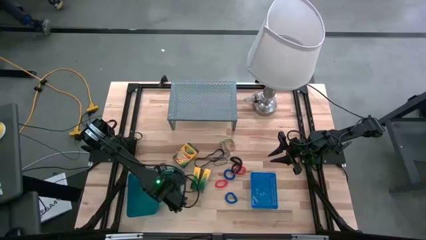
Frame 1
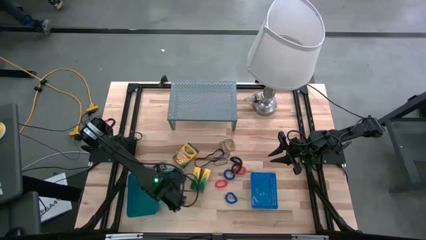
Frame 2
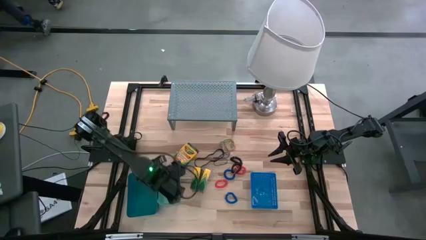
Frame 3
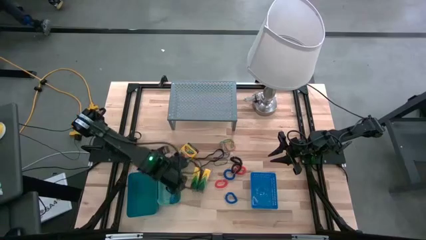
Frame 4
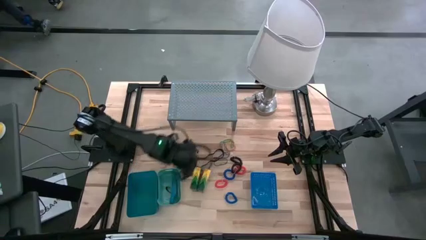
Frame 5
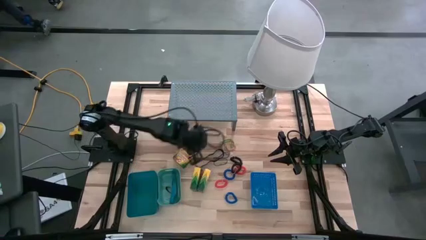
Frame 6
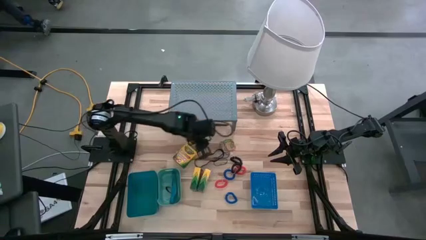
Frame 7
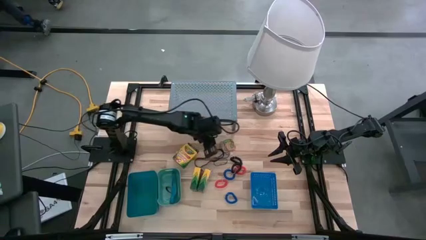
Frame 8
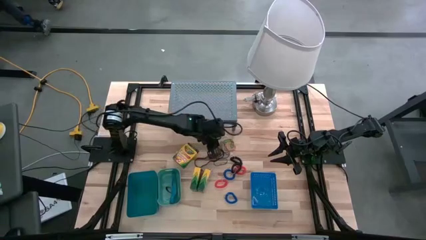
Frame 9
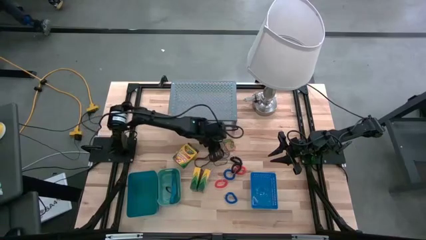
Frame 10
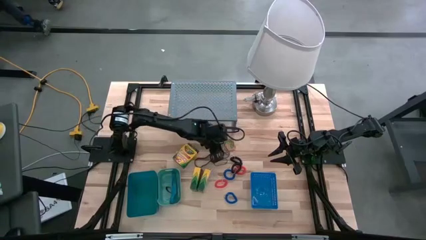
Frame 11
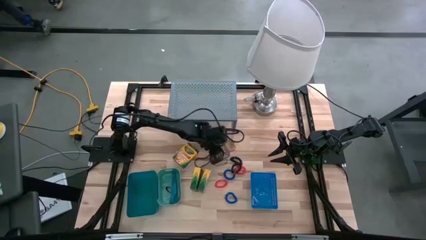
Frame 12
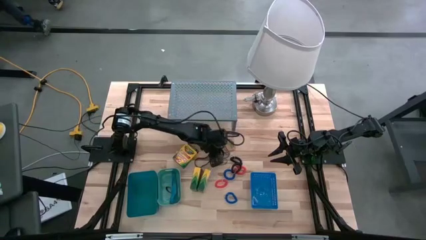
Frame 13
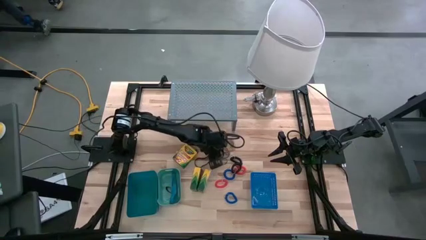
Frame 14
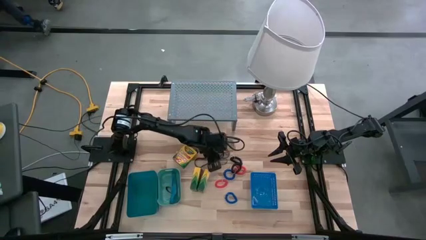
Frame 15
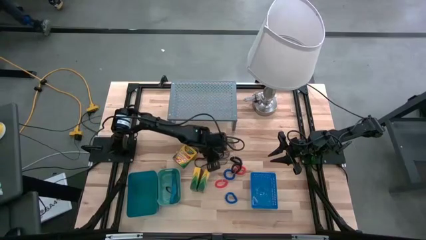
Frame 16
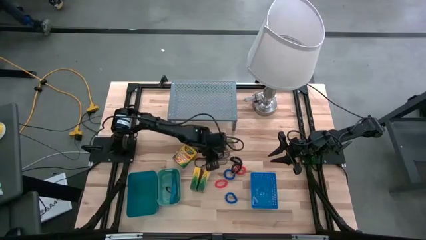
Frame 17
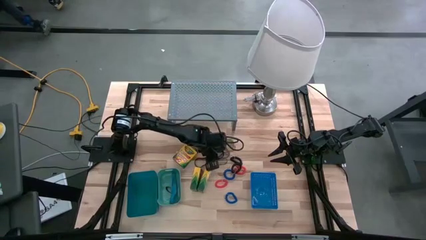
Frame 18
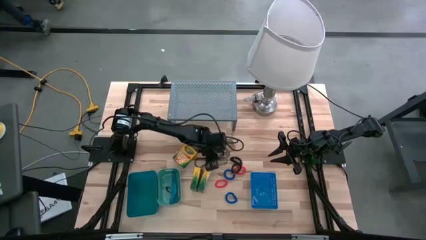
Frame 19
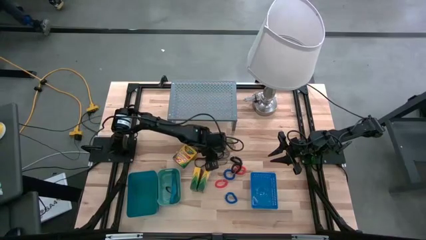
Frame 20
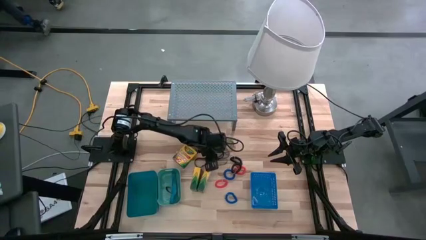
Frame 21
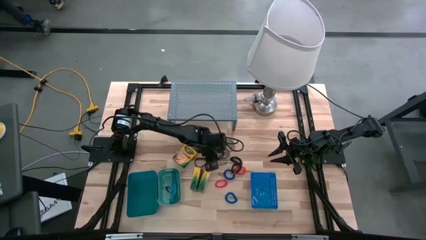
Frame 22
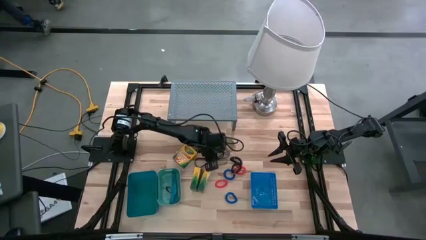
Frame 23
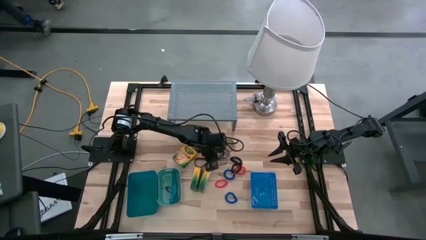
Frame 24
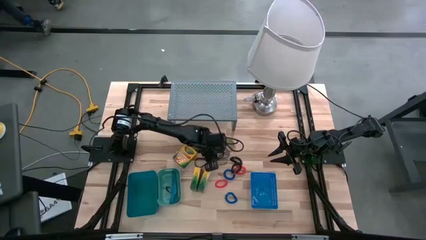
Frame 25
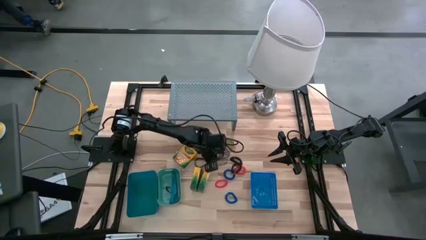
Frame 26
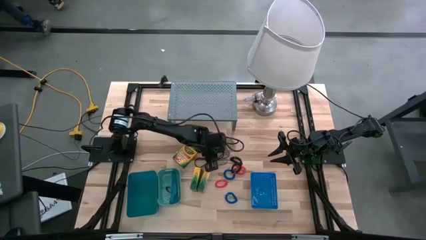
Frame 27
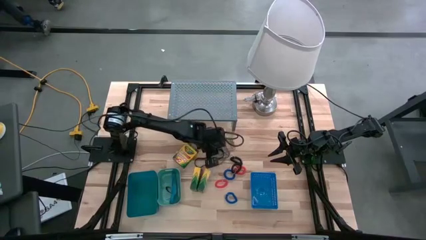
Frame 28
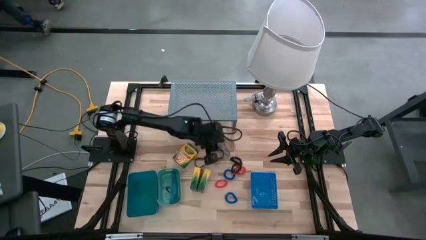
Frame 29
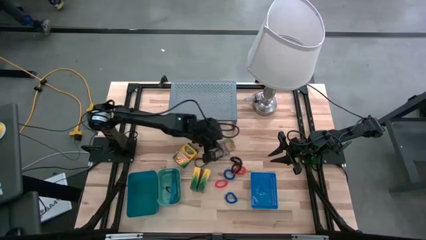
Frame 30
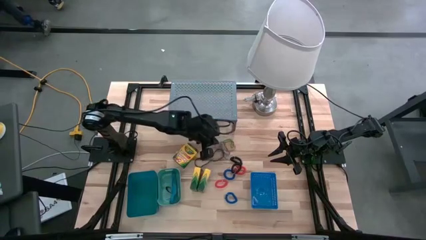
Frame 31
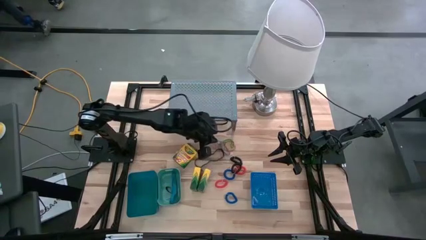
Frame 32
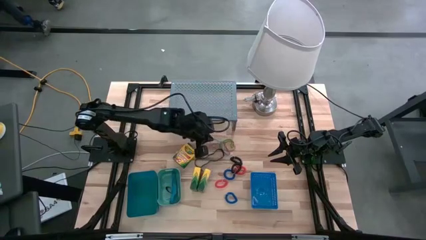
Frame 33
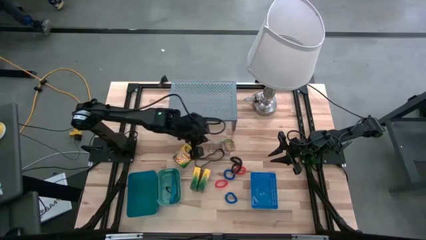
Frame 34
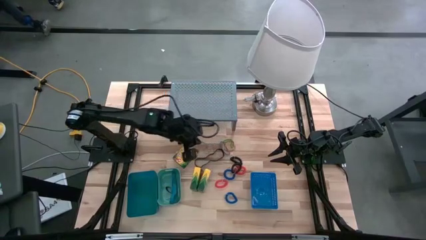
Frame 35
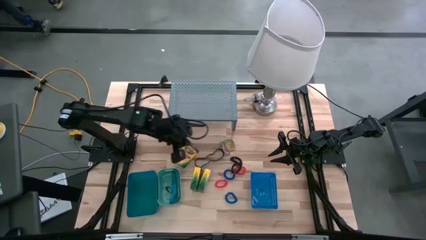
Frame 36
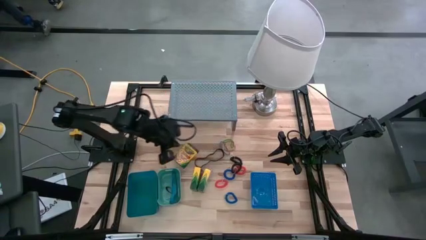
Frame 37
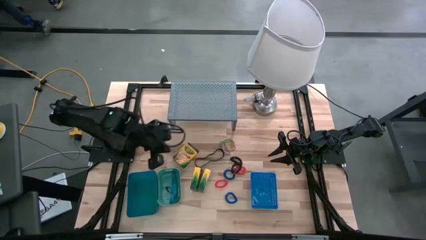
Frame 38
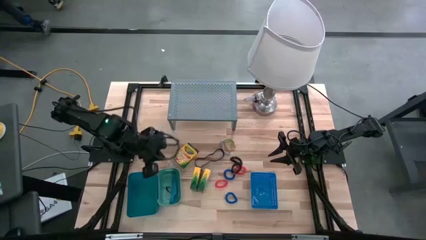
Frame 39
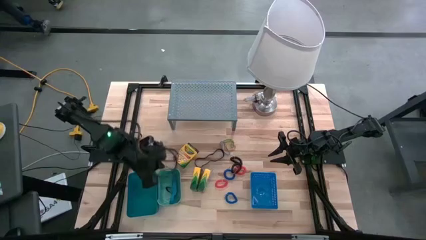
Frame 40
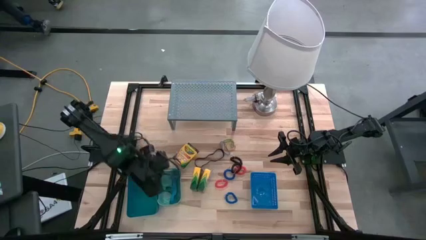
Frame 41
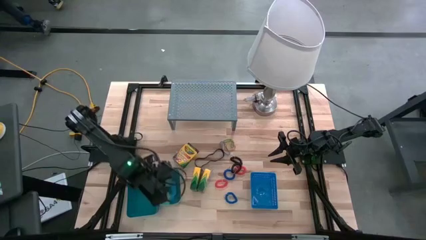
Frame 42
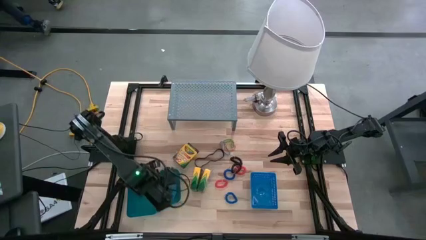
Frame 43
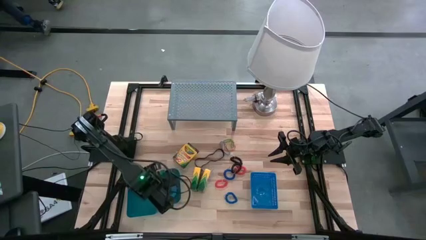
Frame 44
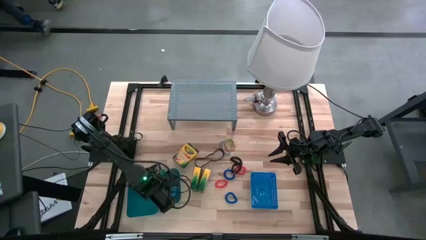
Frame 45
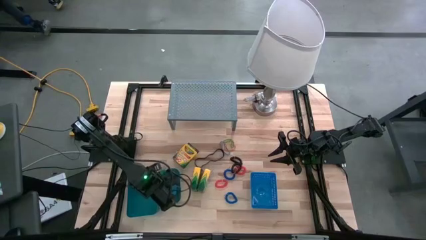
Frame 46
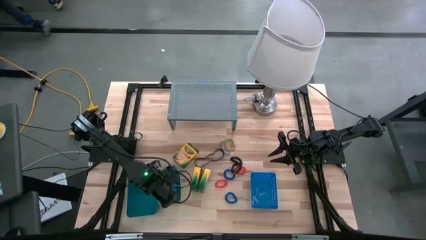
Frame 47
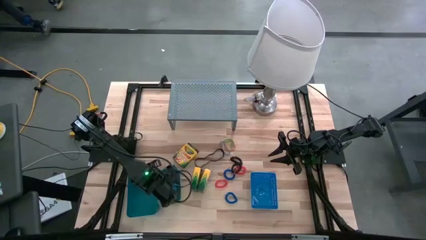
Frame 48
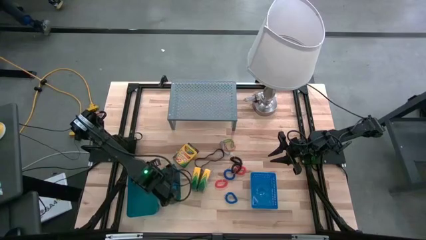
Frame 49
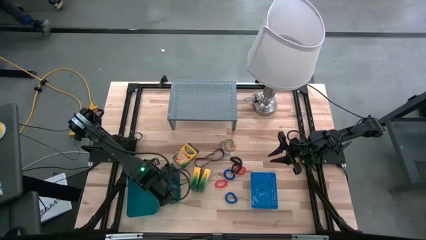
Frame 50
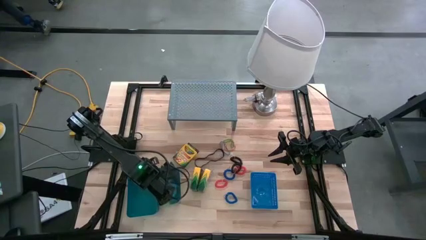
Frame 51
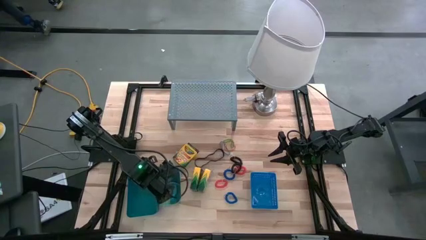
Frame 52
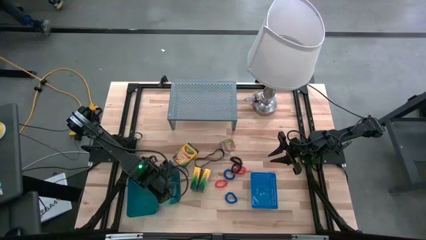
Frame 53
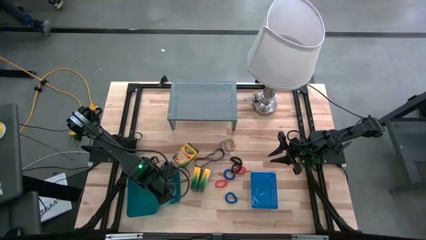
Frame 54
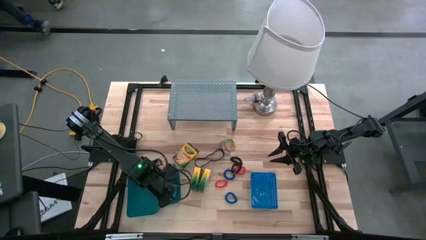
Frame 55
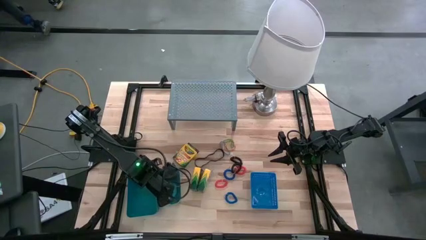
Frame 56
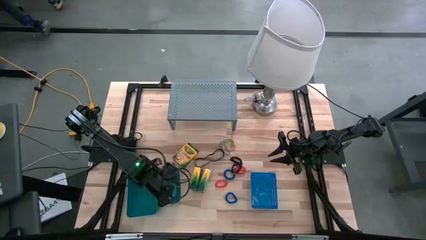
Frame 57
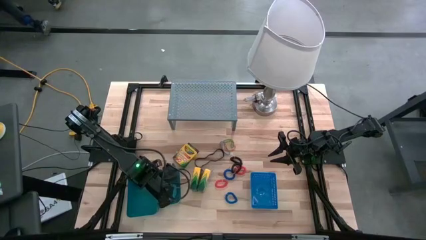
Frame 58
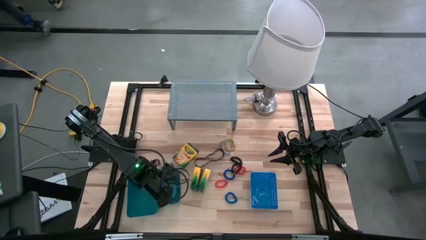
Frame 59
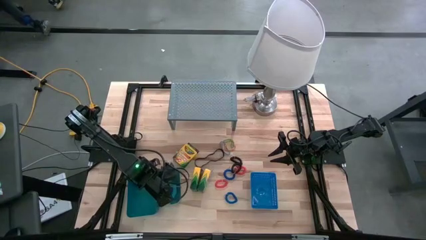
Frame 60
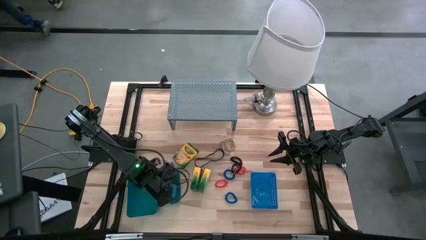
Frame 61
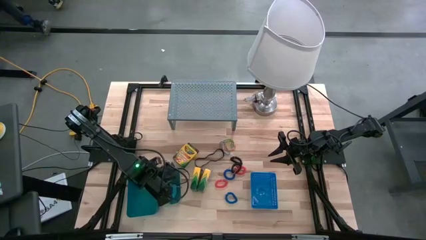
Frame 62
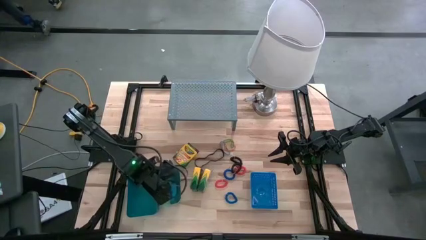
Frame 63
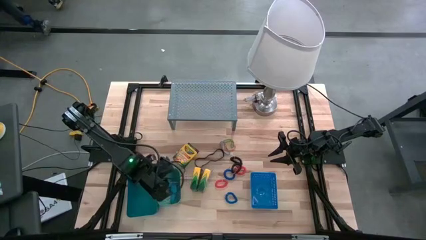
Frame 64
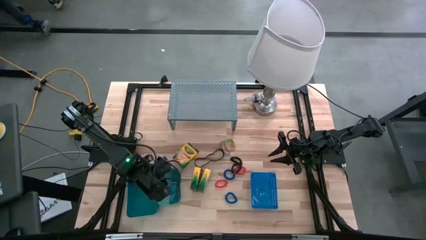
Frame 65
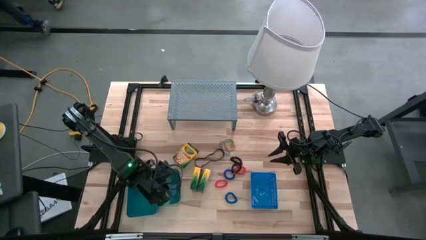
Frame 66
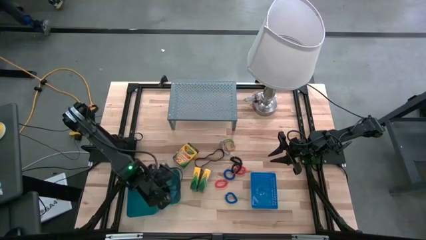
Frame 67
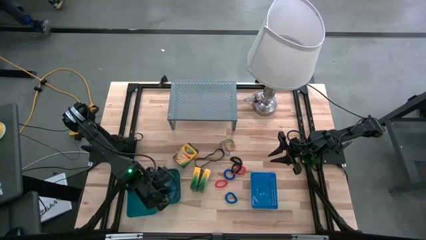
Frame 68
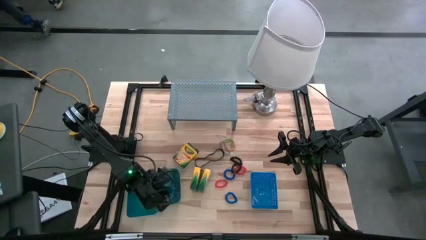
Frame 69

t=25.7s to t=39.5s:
Task: Pick & Place Office Desk Supplies
Put the gray rubber band into the green bin

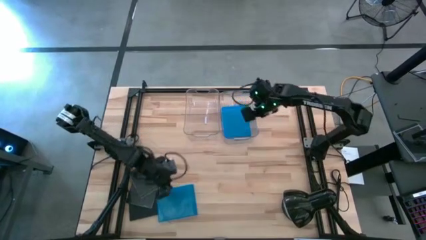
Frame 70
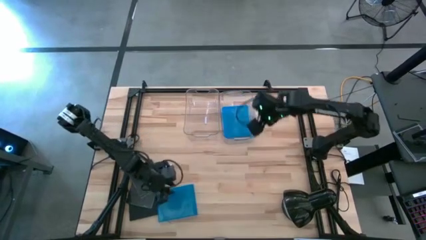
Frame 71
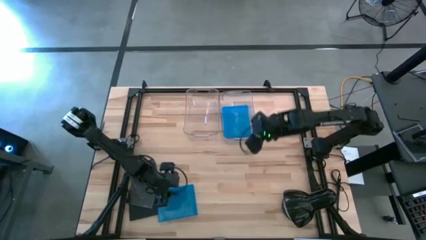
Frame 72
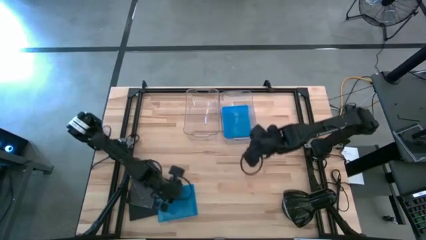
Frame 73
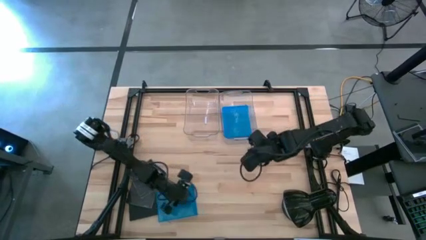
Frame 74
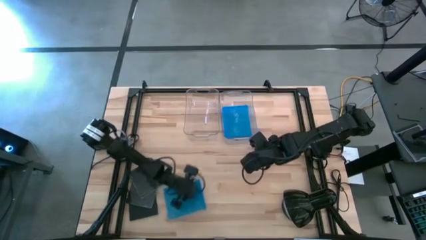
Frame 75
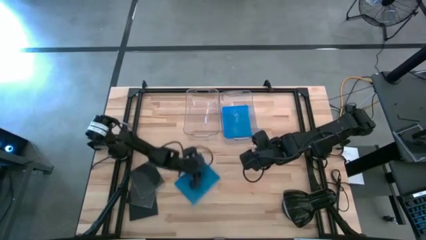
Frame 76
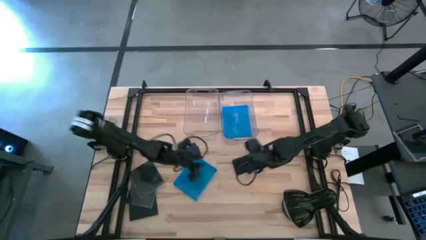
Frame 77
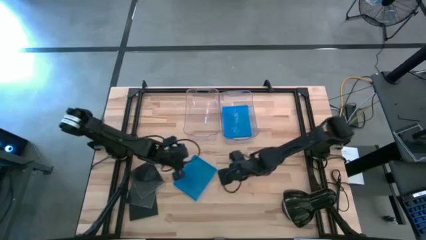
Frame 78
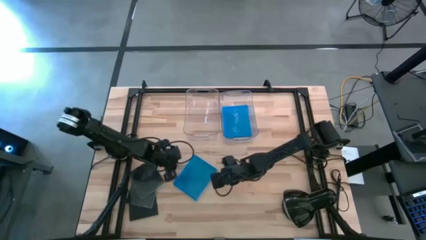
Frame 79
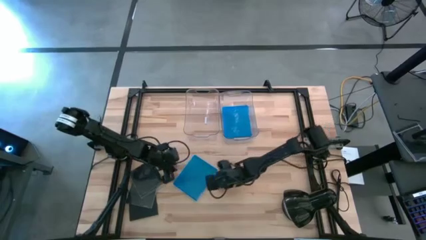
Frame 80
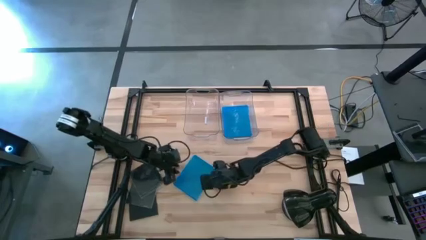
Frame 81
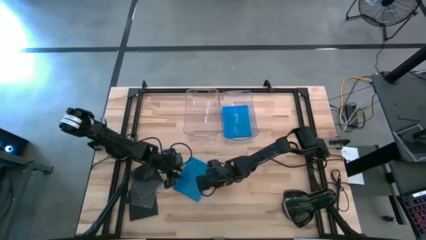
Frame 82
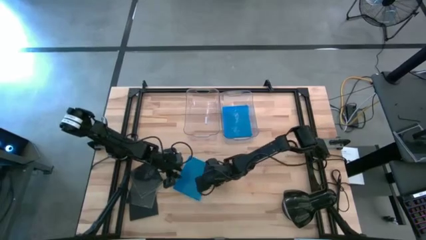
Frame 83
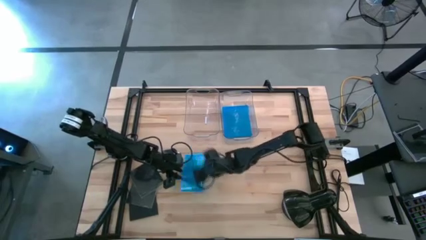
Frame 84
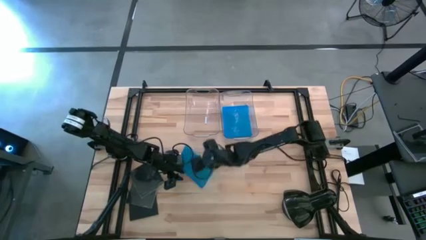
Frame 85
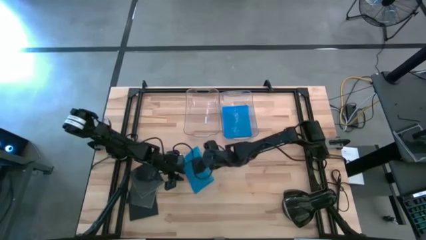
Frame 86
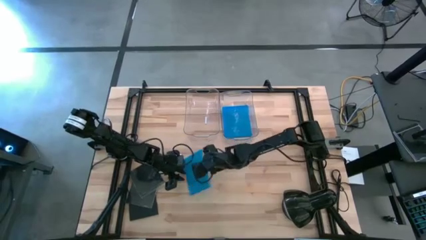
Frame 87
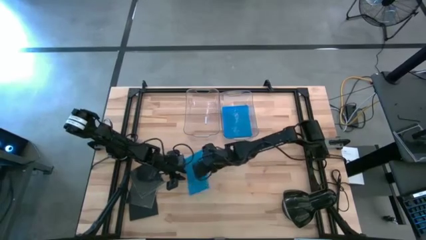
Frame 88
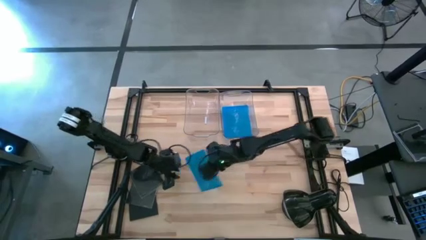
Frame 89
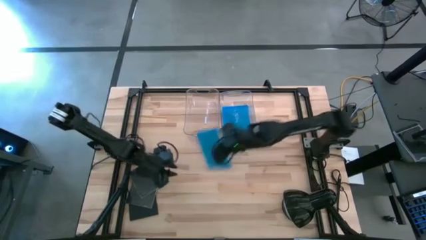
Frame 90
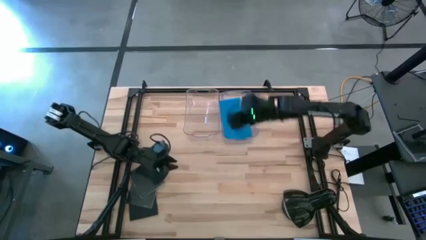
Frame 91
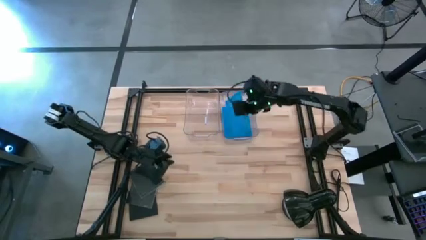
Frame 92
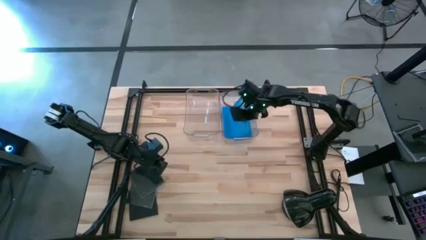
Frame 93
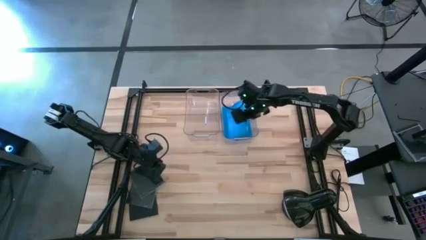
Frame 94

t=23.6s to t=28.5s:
Task: Pick & place jewel cases by type
Put the blue CD case into the right transparent bin
